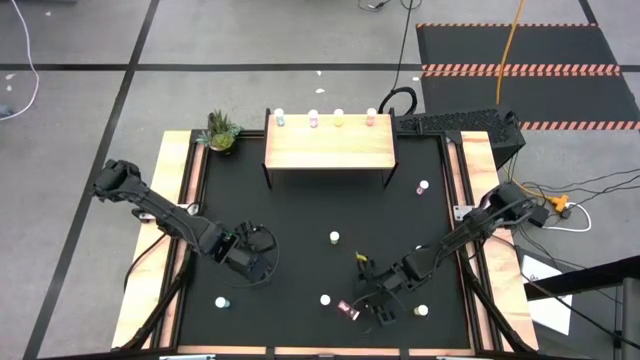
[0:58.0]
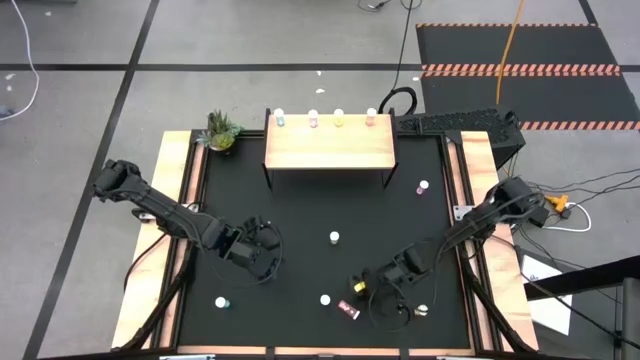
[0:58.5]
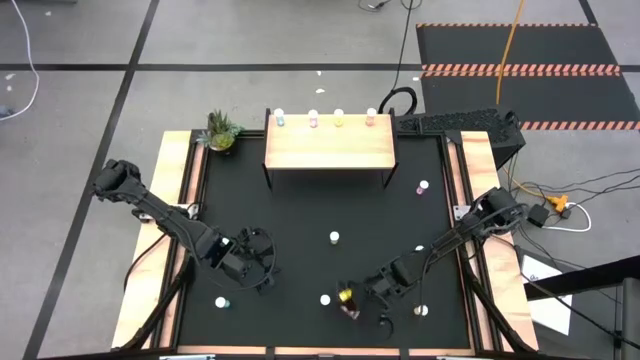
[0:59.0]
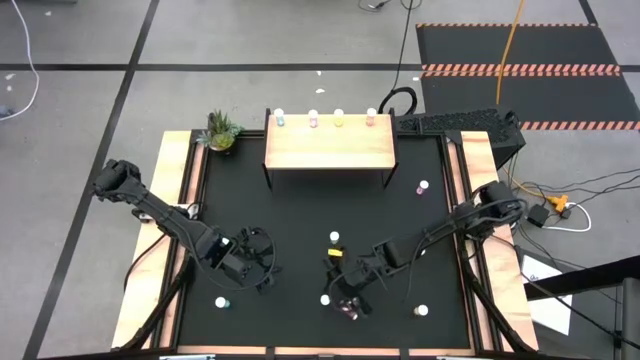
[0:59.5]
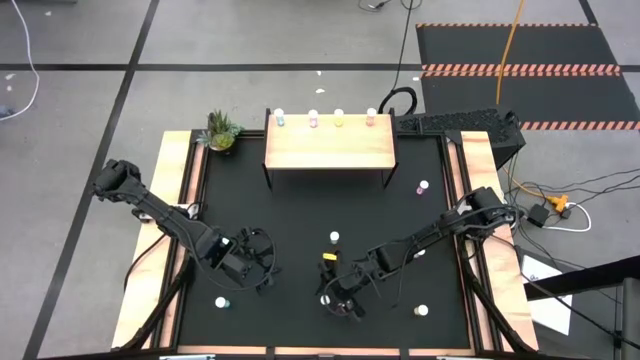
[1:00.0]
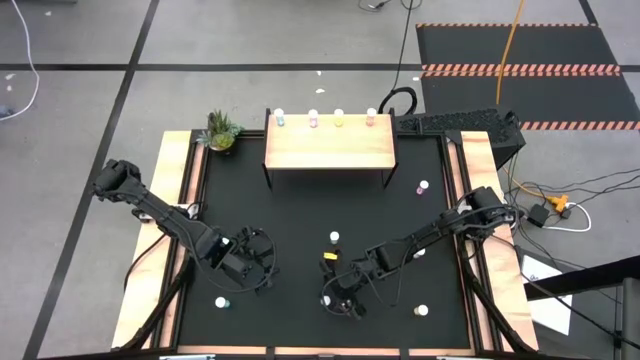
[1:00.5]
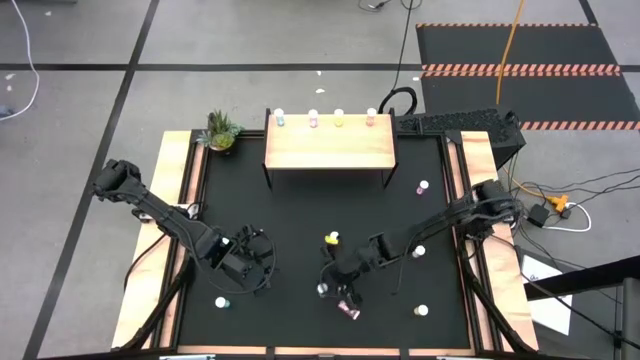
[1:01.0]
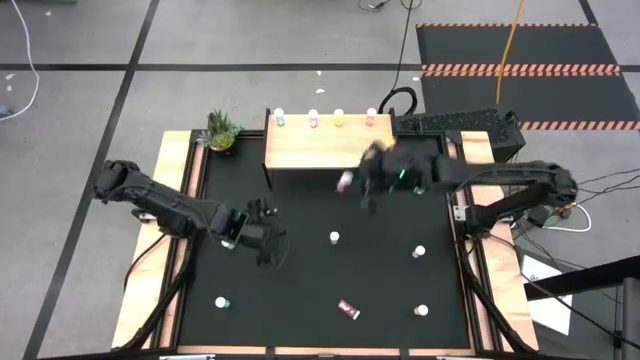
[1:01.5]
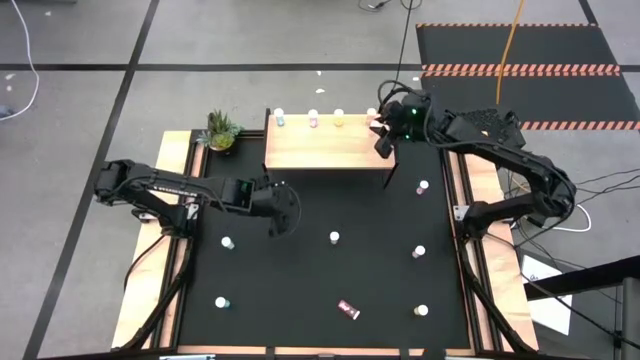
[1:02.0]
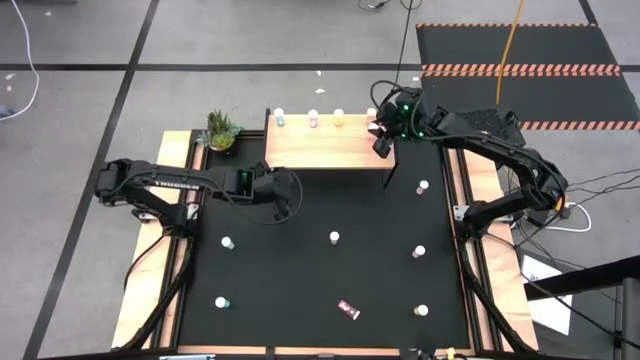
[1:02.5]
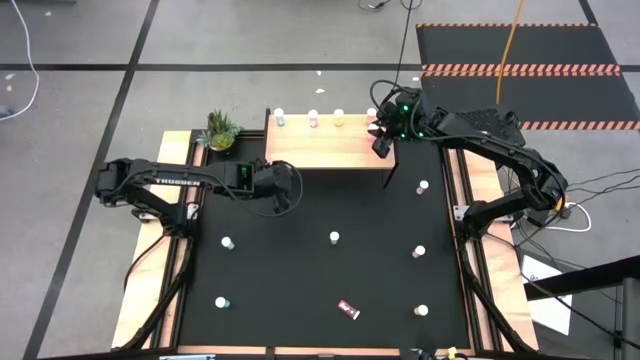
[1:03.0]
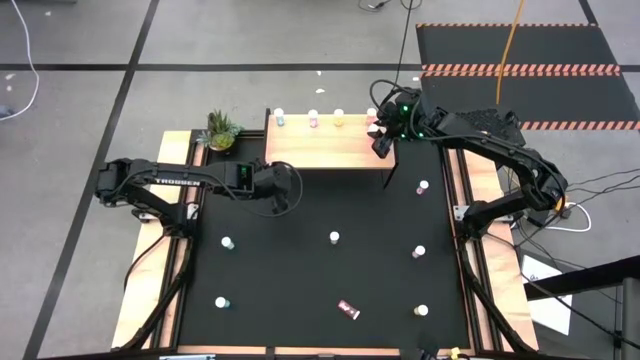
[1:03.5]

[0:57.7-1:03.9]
Task: Pick and place medicine bottles onto shelf by color
Put the bottom left pink pill bottle aligned with the other pink pill bottle on the shelf

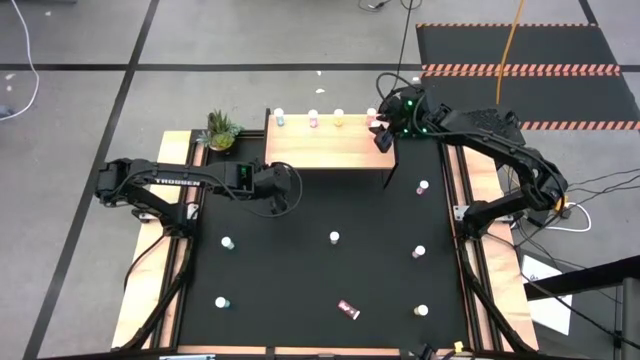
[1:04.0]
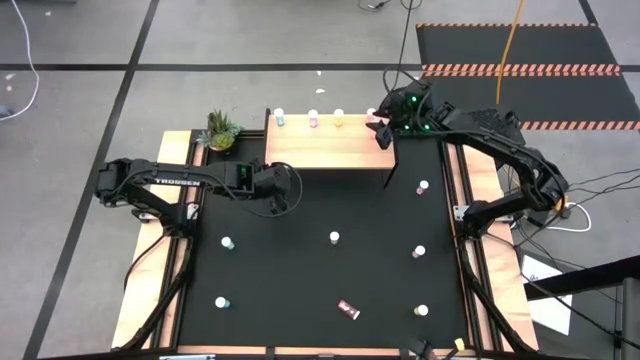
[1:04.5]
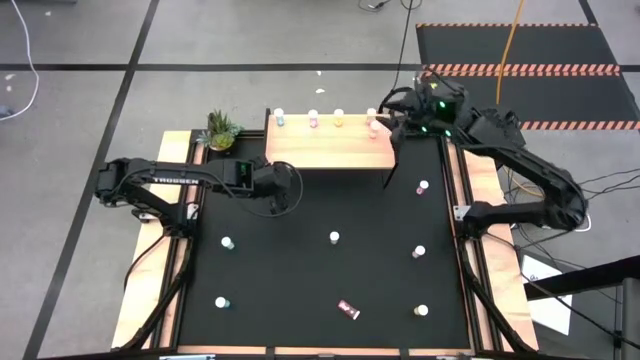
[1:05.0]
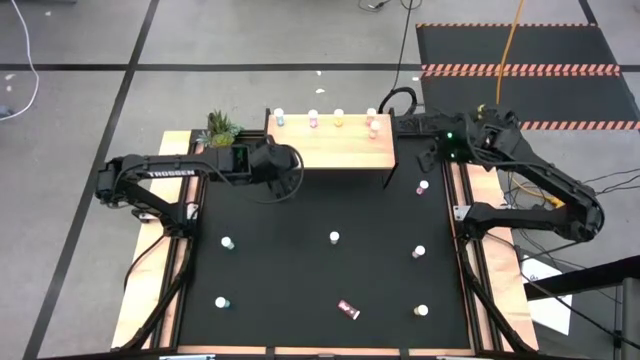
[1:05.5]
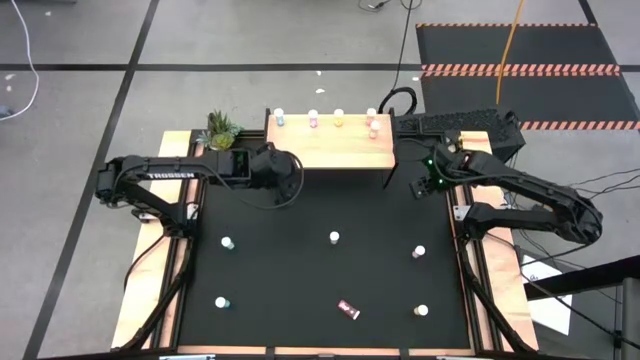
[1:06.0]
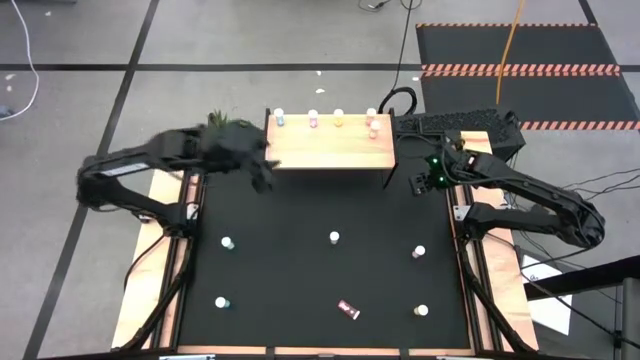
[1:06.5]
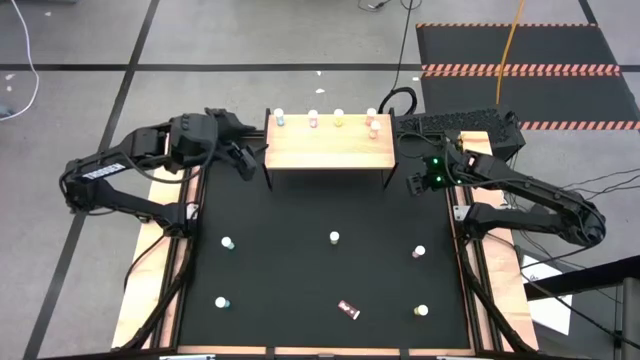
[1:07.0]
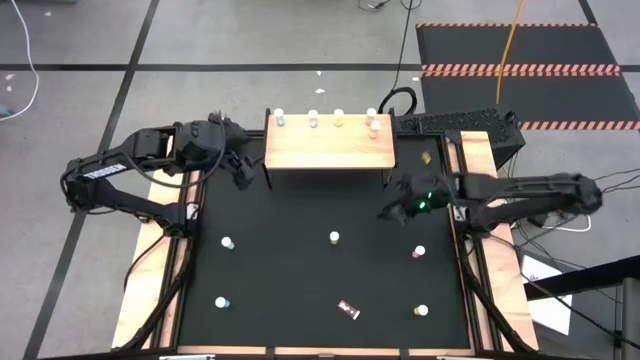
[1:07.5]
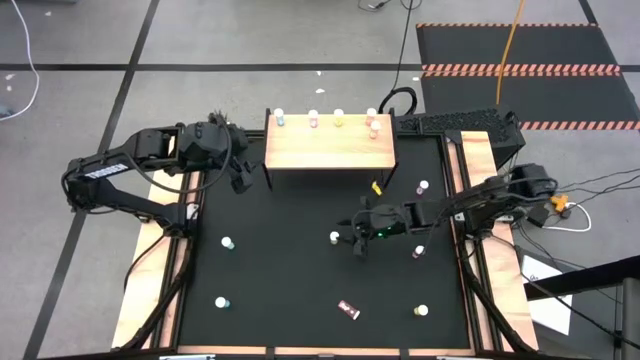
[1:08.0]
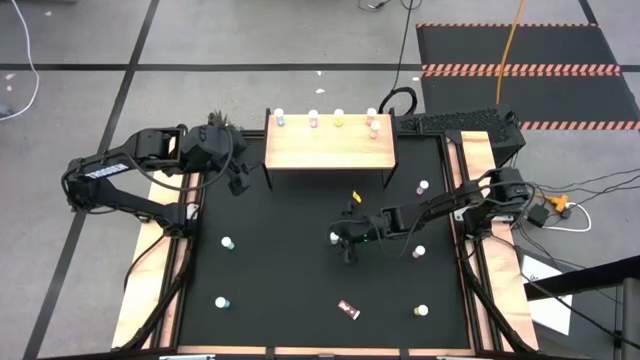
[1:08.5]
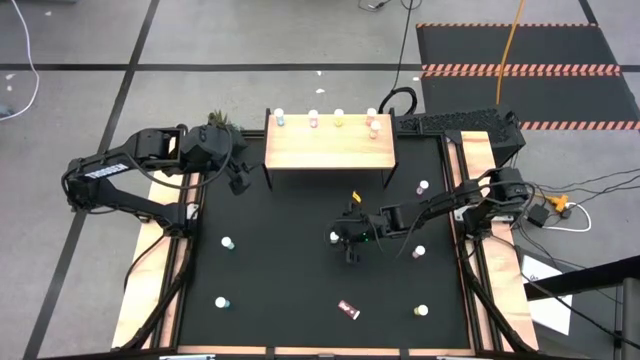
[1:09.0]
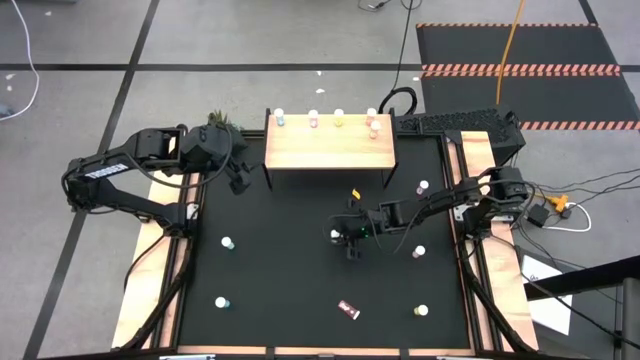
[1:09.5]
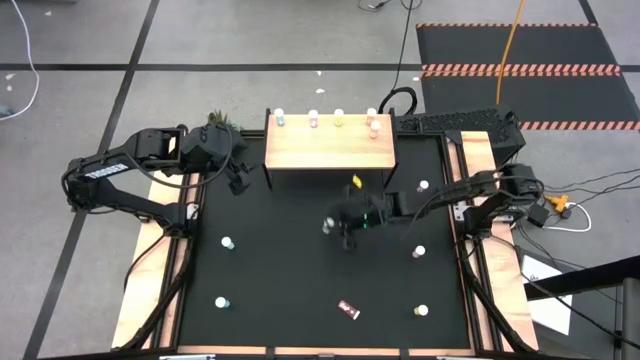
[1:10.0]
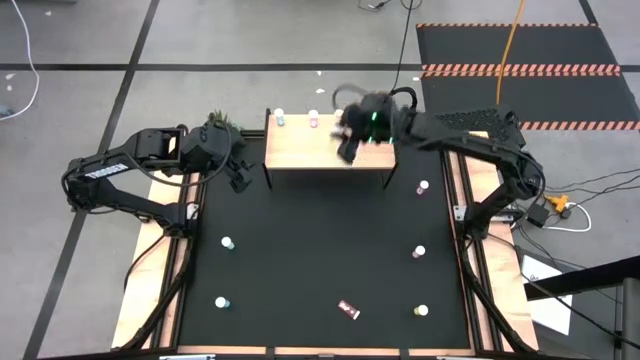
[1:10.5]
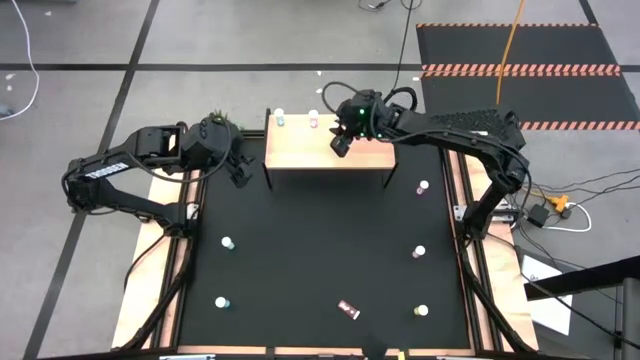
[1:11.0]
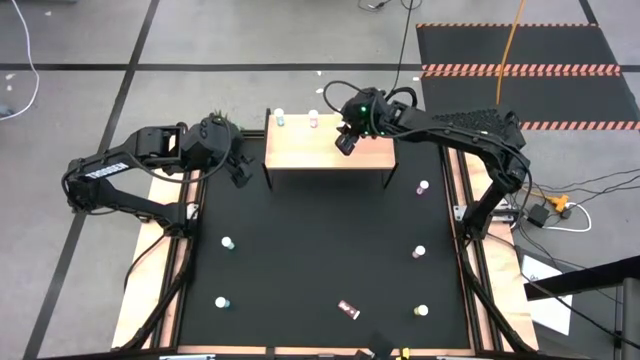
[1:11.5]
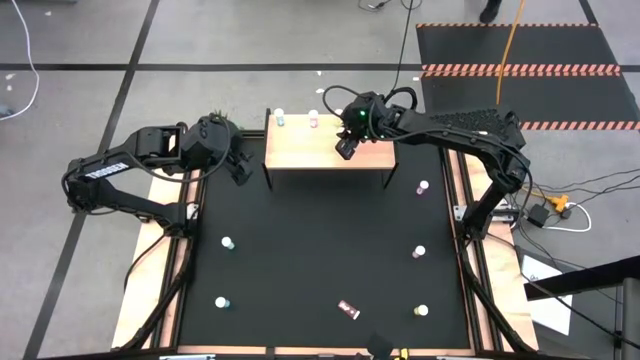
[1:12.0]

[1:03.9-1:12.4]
Put the top yellow pill bottle aligned with the other yellow pill bottle on the shelf

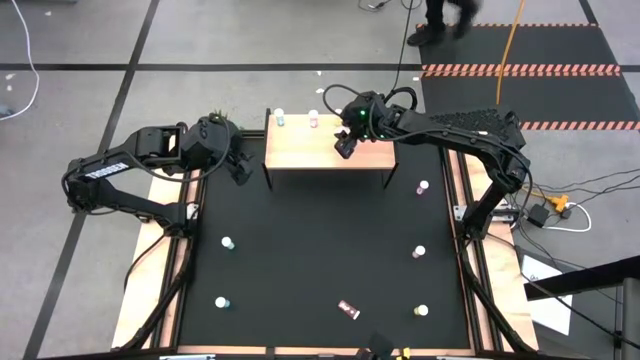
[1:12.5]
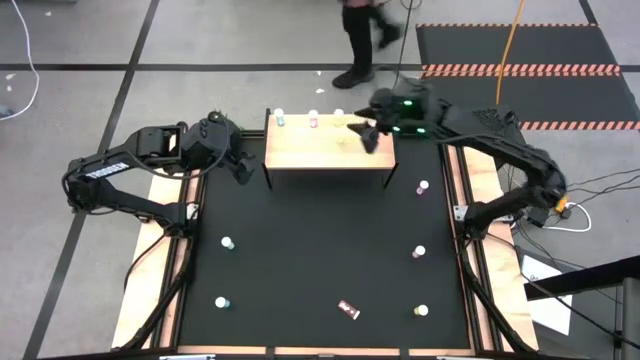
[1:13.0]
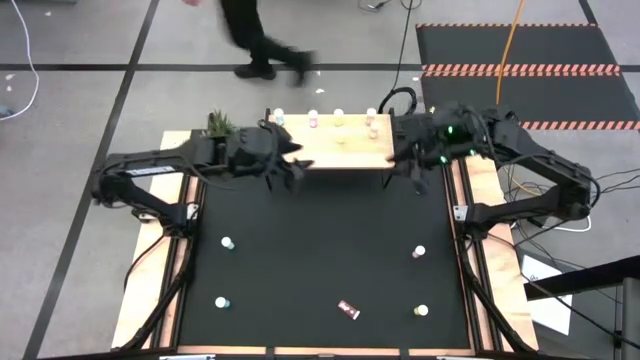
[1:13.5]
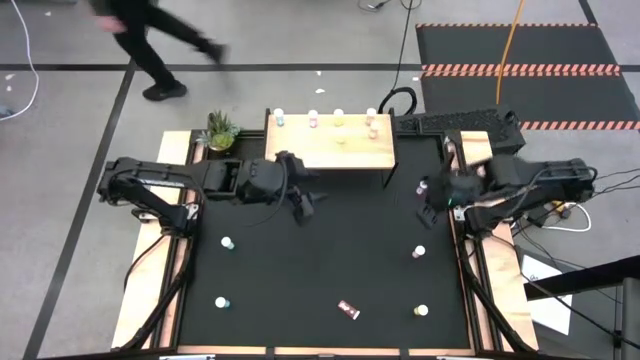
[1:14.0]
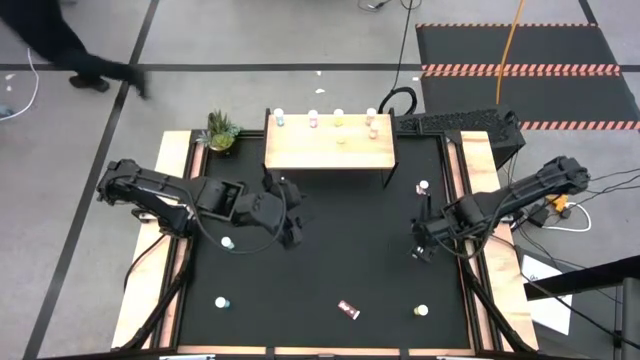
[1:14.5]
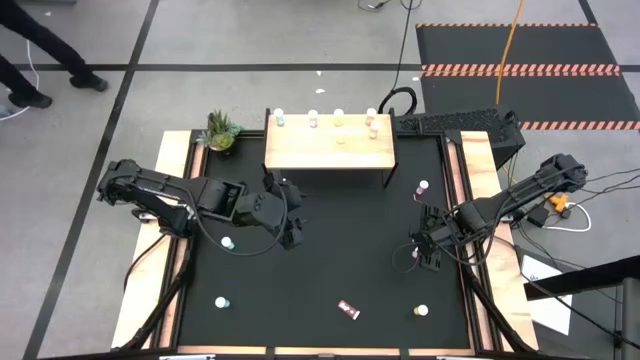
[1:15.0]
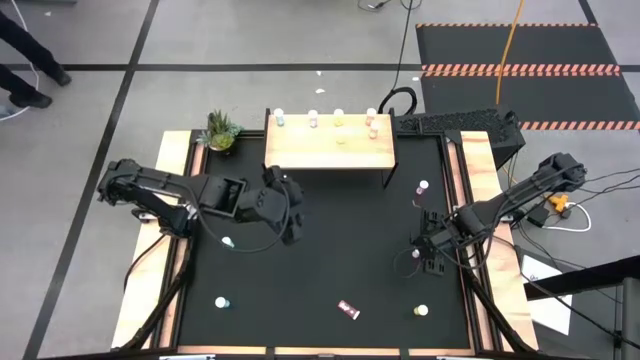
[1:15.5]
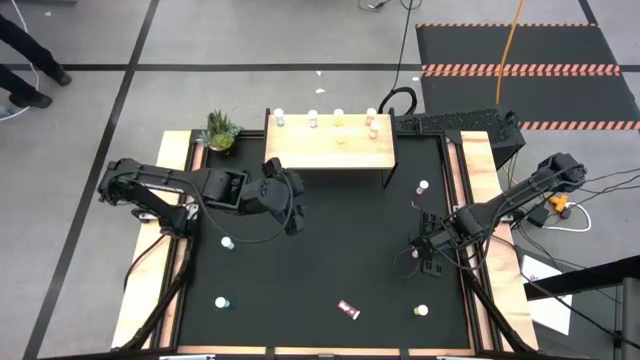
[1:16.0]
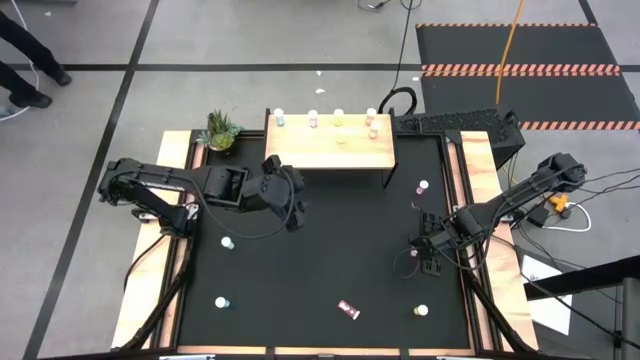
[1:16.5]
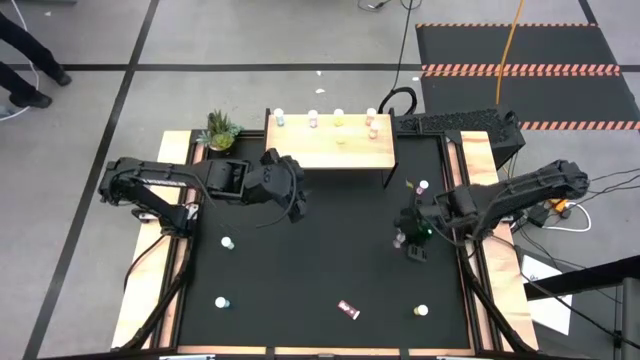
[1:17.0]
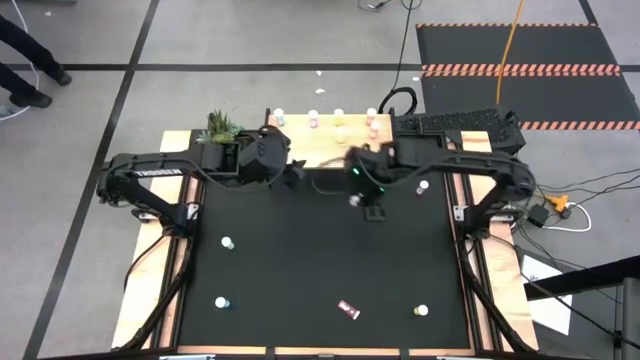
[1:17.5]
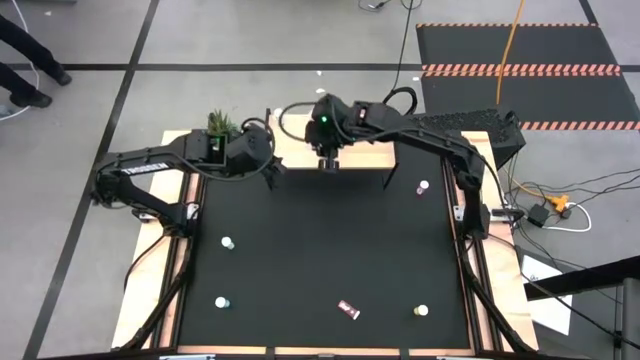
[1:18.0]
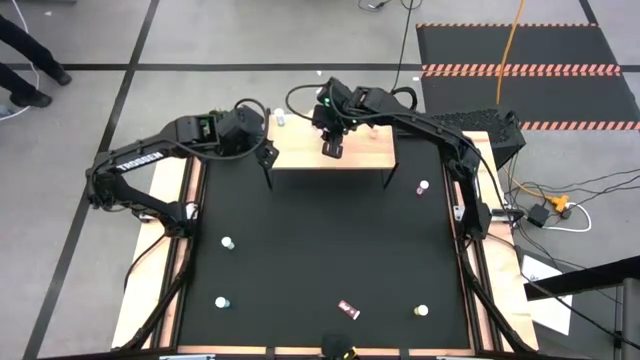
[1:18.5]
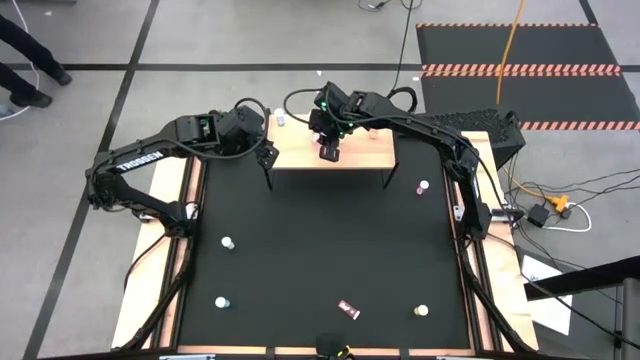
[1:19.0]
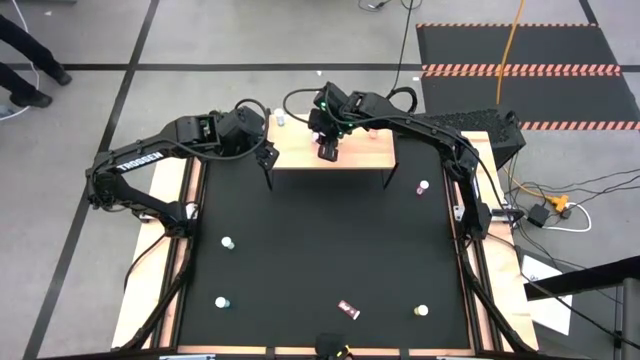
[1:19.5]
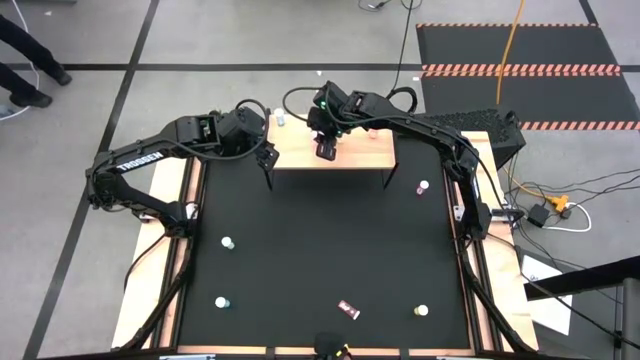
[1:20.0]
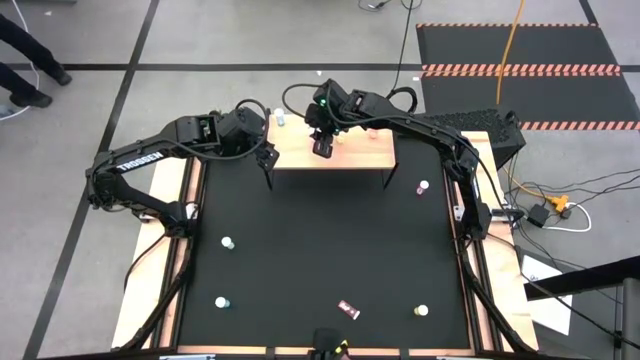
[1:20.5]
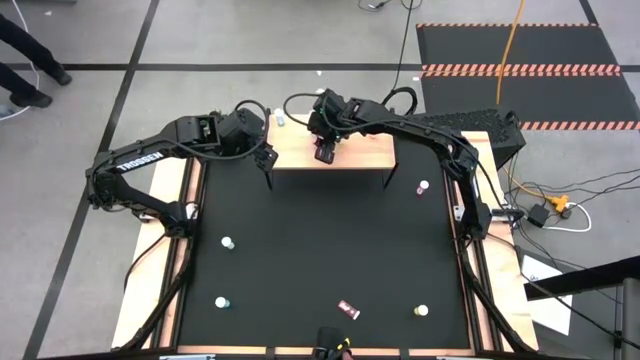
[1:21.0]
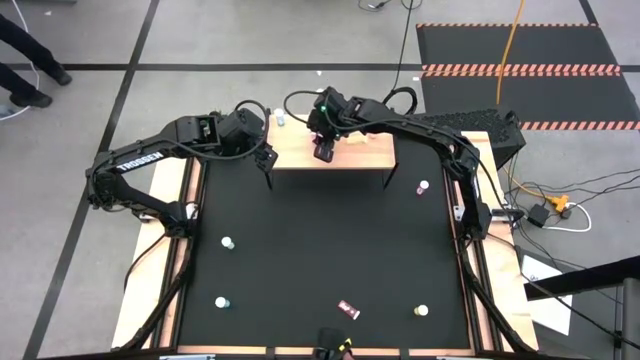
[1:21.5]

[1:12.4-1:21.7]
Put the bottom violet pill bottle aligned with the other violet pill bottle on the shelf
